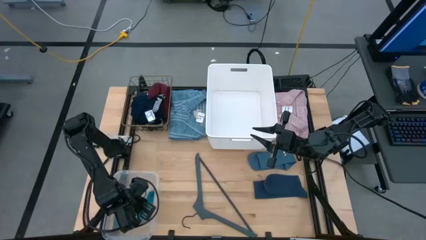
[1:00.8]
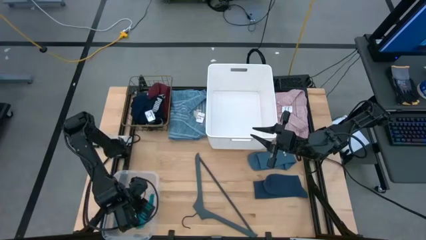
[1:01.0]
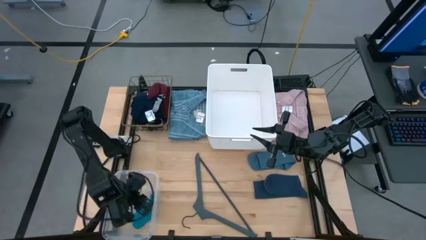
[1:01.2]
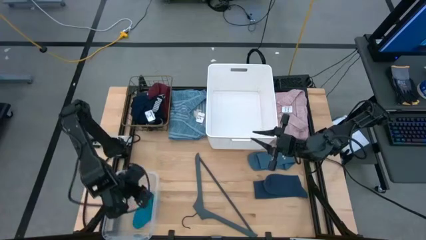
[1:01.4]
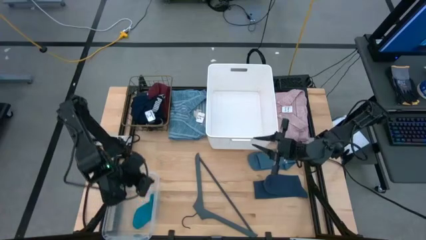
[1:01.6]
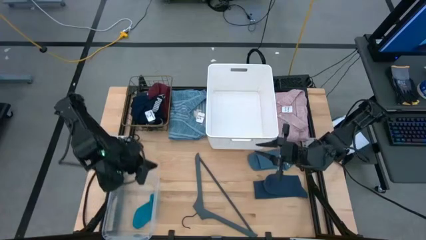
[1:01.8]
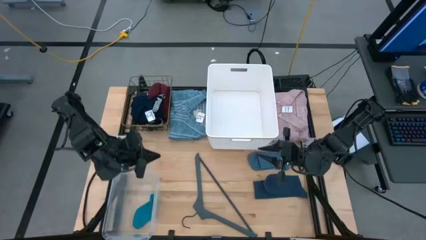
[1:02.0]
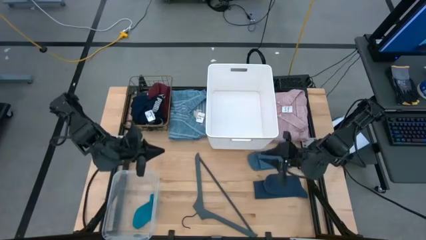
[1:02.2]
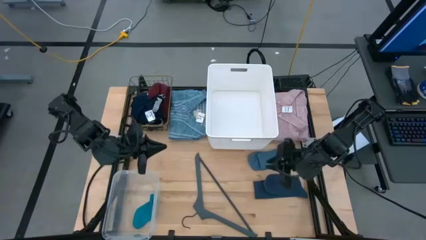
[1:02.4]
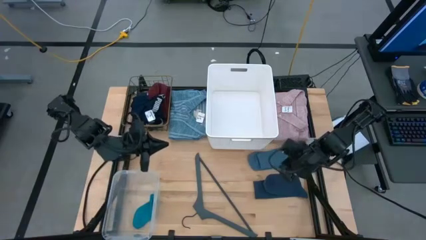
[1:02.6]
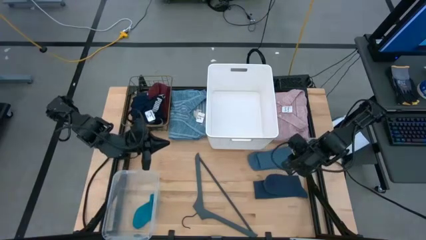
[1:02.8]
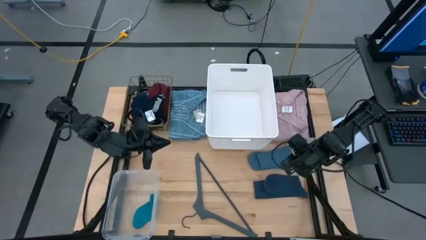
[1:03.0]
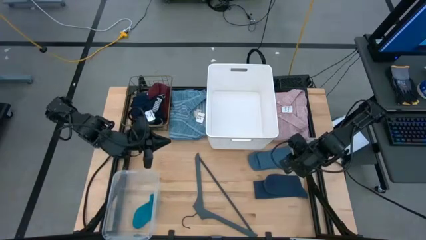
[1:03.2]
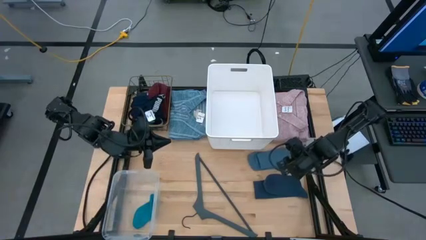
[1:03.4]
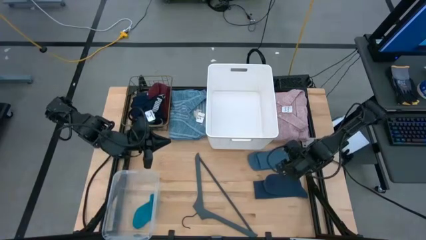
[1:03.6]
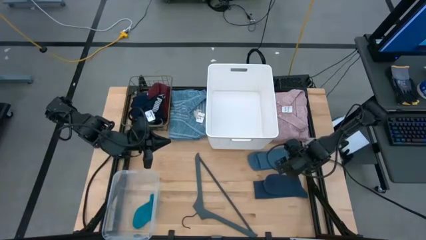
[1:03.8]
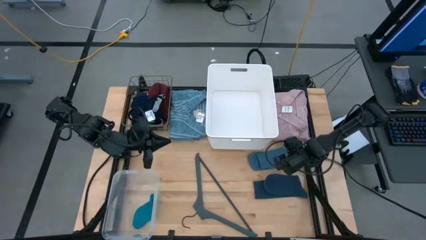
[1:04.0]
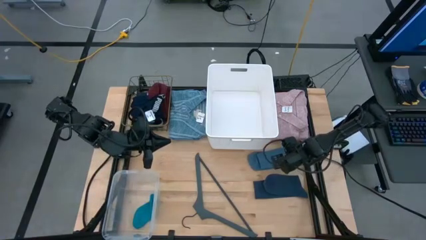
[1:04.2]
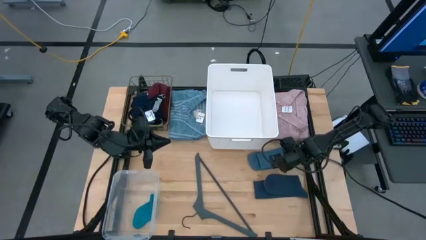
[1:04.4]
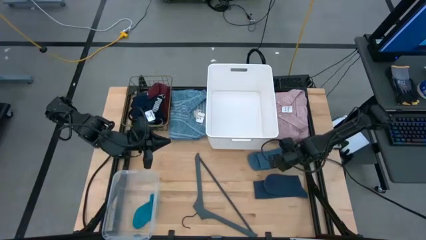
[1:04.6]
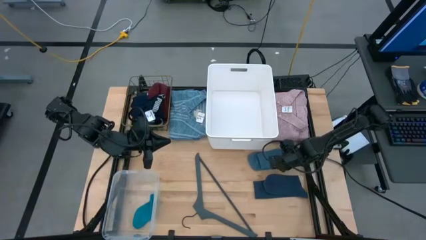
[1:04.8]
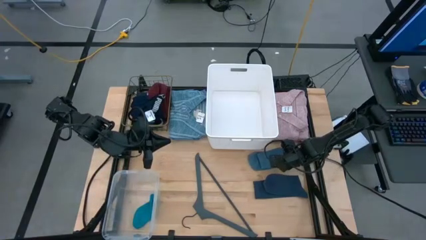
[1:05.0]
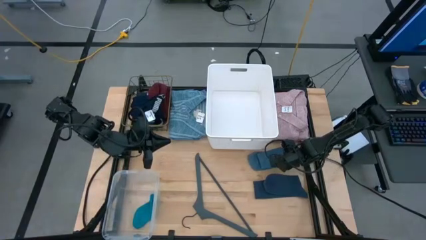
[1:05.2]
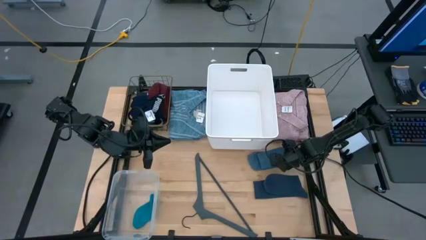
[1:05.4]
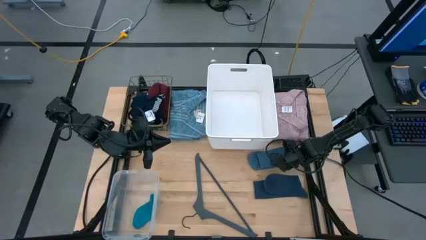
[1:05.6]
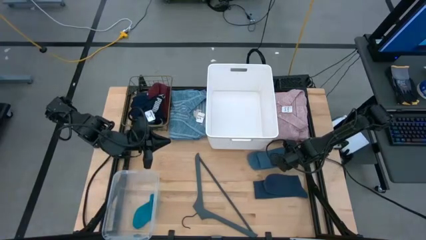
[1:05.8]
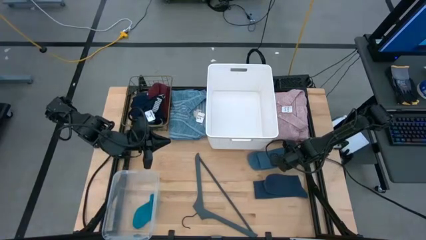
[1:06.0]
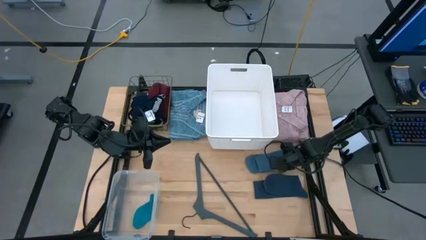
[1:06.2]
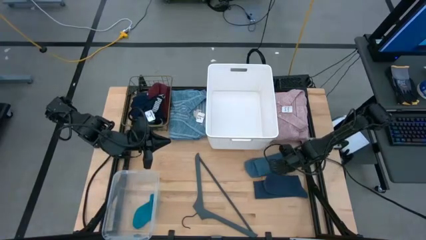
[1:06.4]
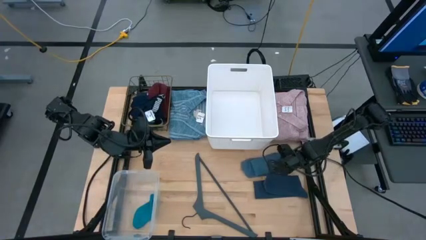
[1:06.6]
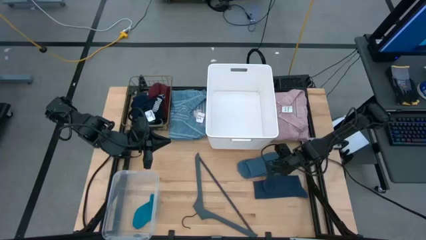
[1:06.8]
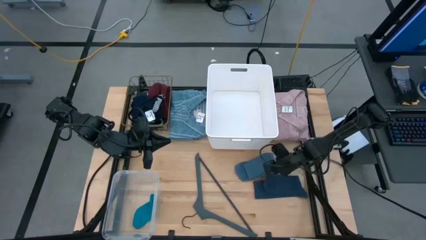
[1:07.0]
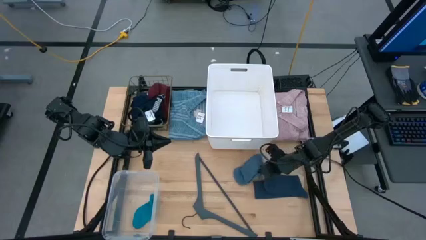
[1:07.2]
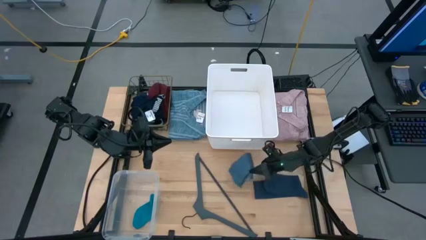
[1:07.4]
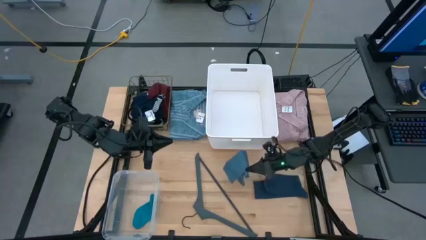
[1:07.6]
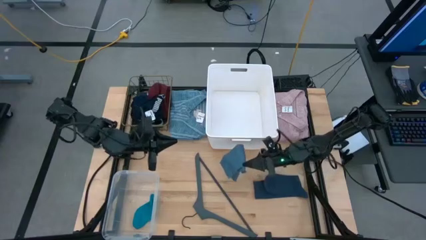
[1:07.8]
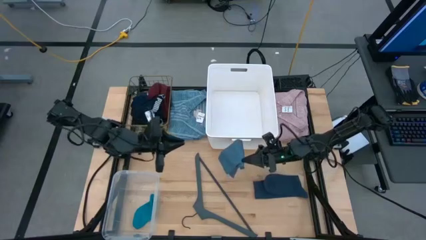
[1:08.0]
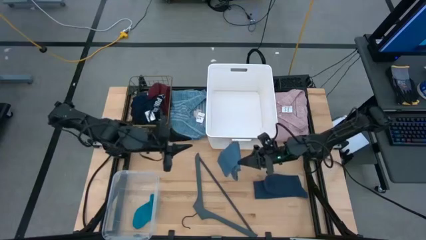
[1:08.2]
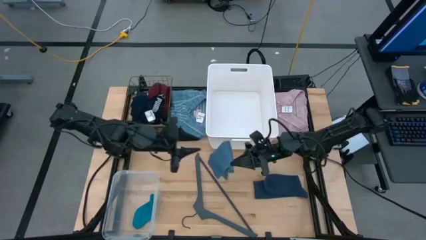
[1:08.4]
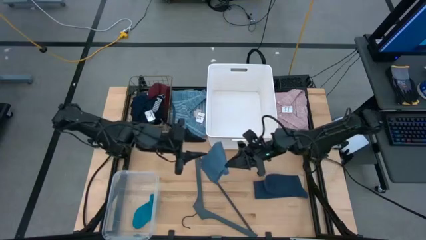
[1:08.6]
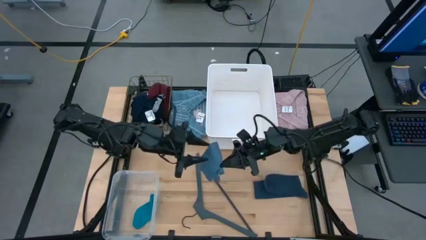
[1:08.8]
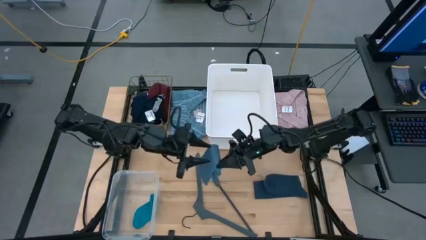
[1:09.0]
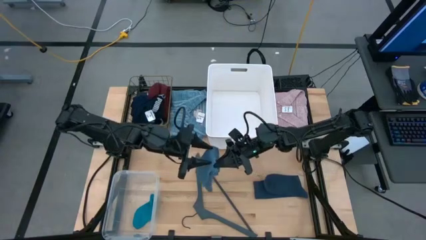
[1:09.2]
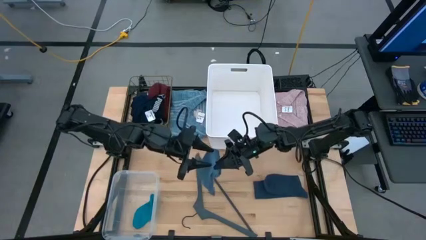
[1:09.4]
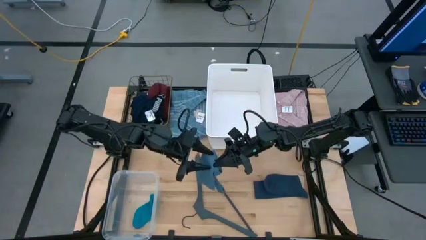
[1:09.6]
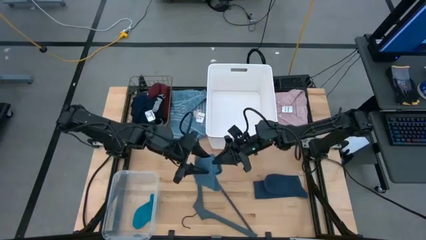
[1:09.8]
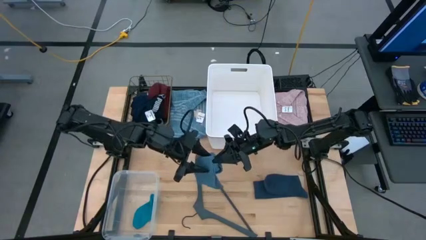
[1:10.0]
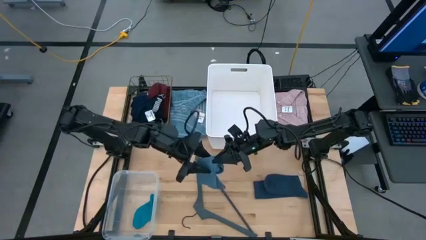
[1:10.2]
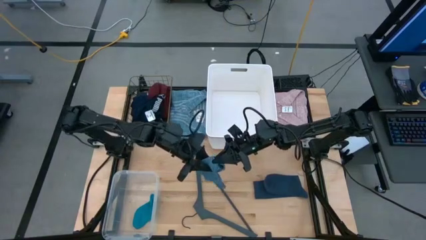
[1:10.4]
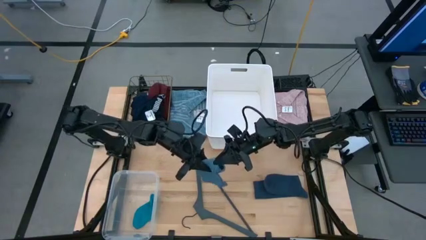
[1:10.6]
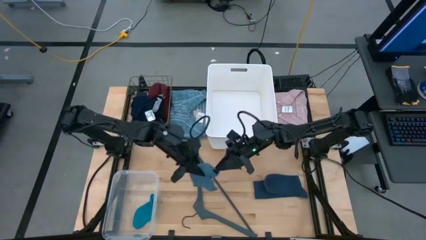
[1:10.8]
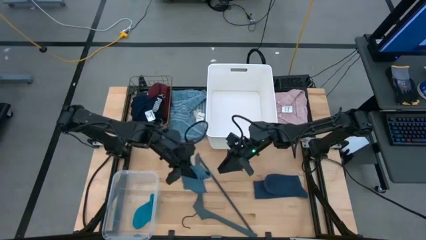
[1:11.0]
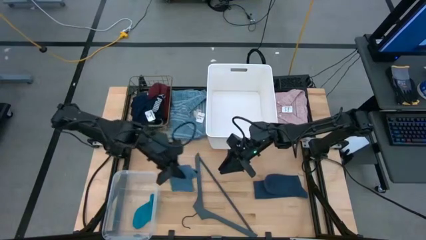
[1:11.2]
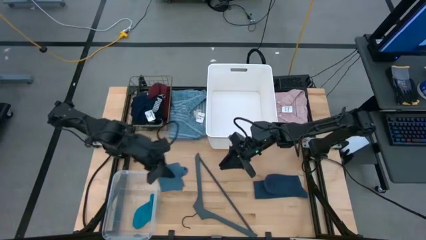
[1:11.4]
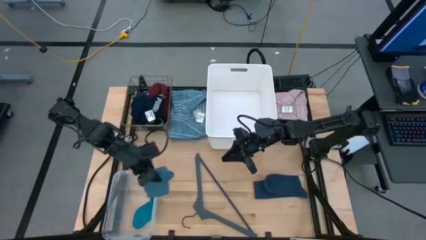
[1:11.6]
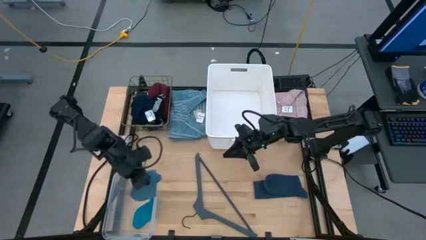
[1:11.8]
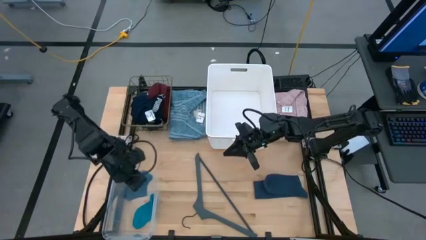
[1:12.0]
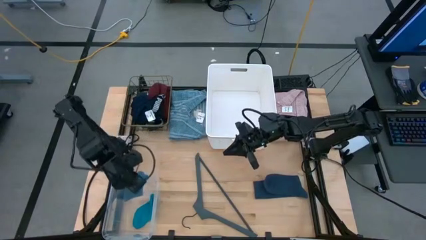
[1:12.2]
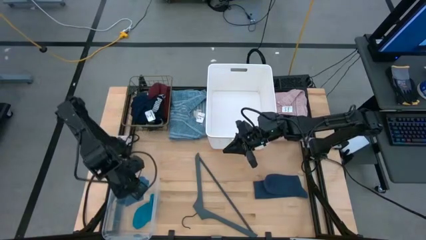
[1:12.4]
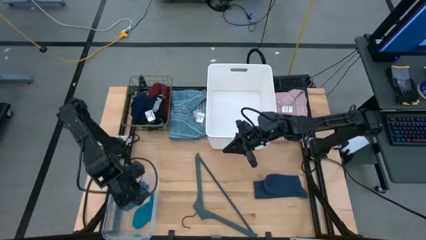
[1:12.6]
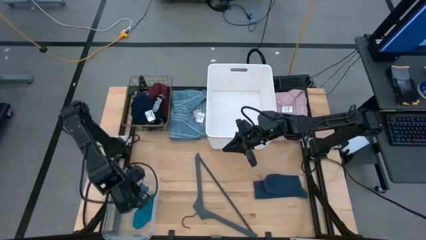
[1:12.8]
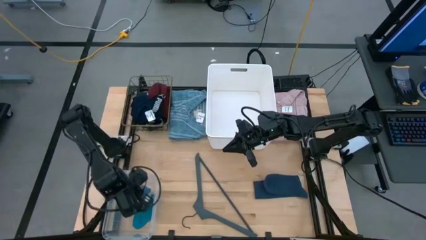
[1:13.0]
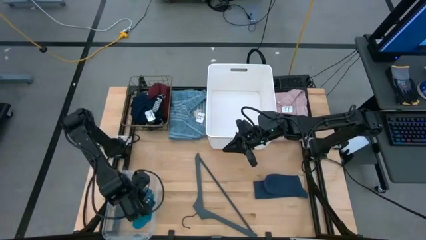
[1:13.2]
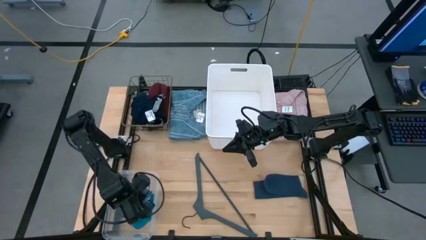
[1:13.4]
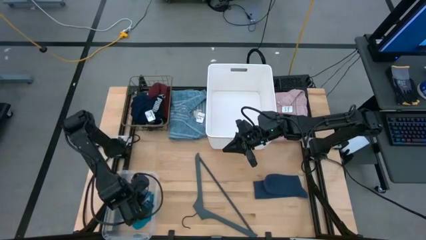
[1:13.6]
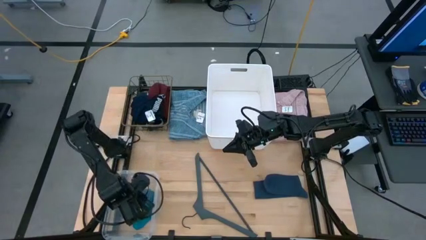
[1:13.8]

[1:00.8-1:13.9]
Task: Pick & Place Cloths
Put the gray sock into the transparent bin

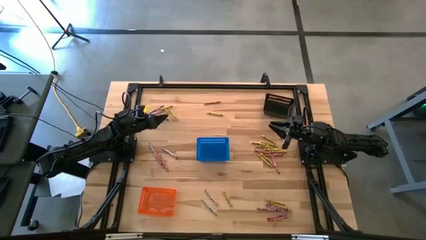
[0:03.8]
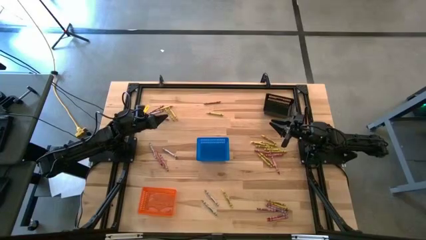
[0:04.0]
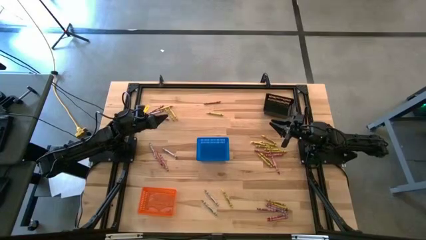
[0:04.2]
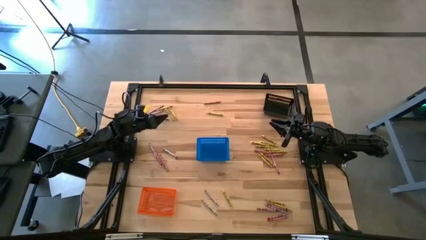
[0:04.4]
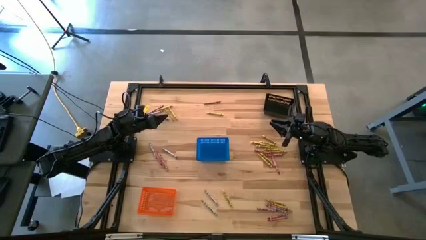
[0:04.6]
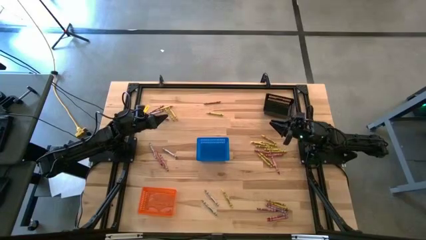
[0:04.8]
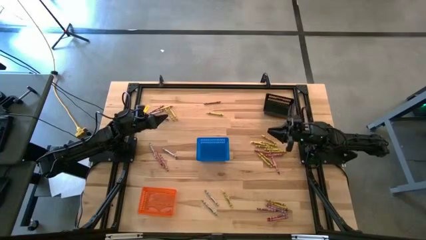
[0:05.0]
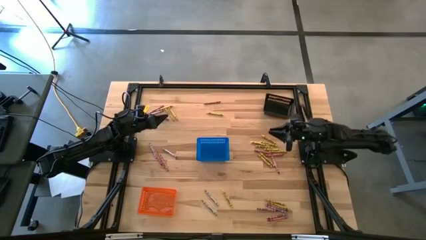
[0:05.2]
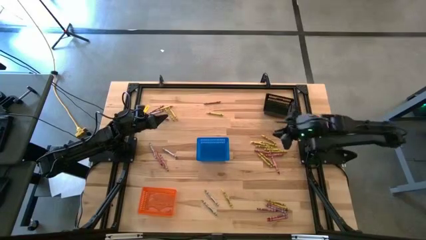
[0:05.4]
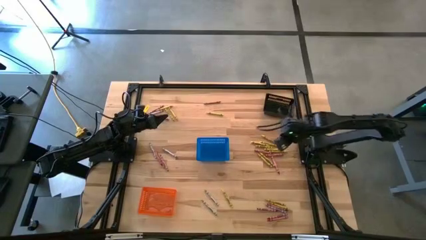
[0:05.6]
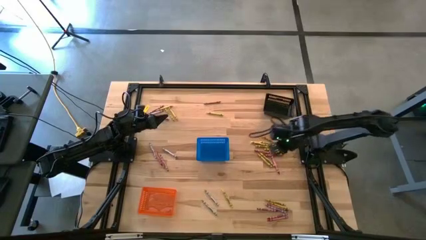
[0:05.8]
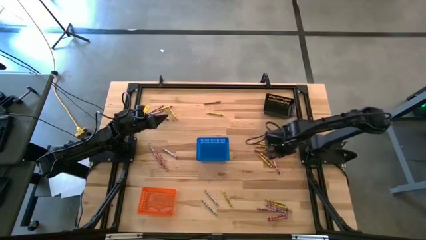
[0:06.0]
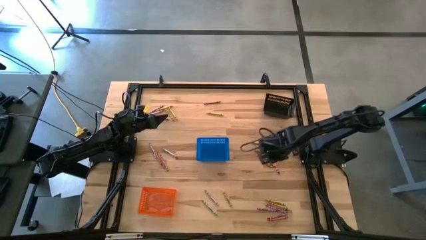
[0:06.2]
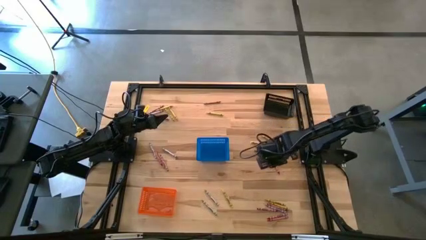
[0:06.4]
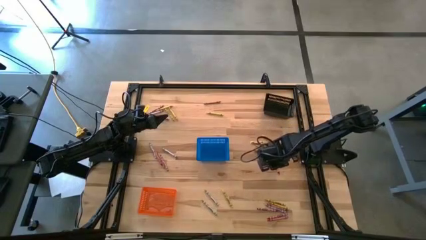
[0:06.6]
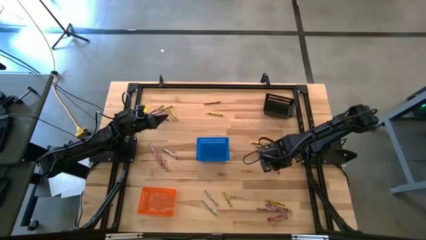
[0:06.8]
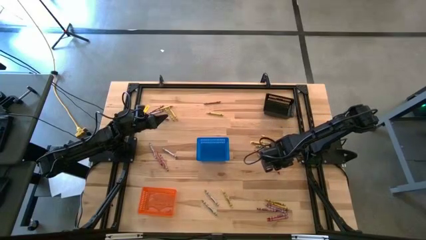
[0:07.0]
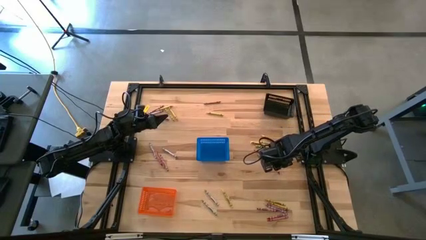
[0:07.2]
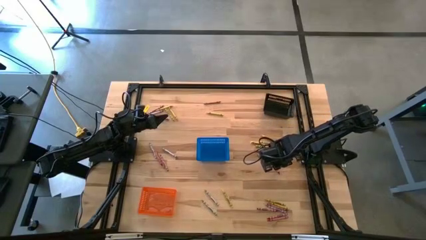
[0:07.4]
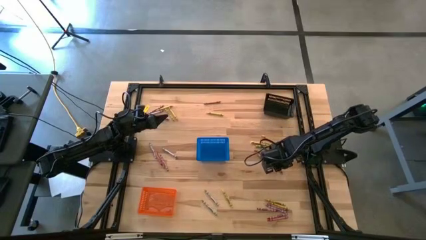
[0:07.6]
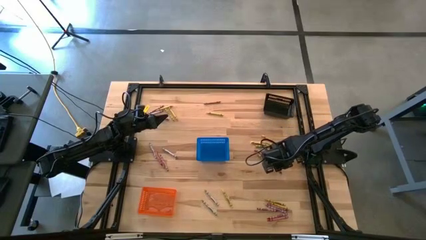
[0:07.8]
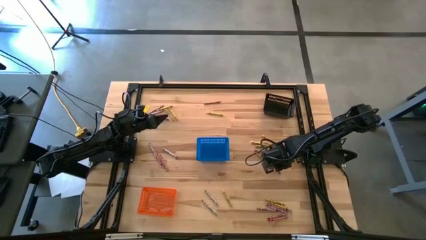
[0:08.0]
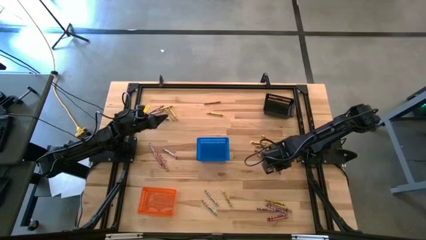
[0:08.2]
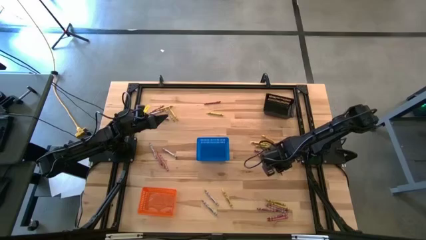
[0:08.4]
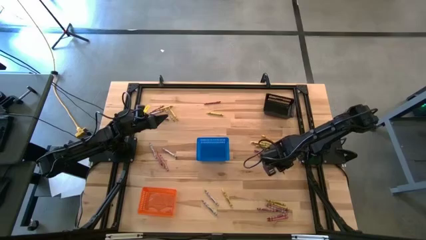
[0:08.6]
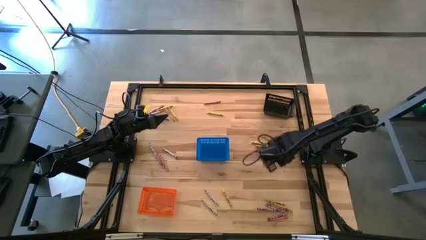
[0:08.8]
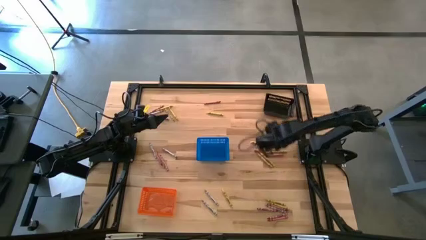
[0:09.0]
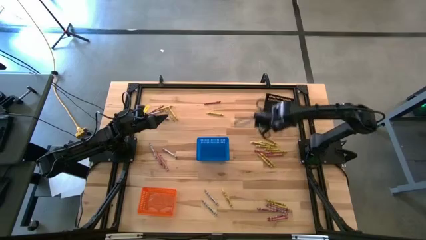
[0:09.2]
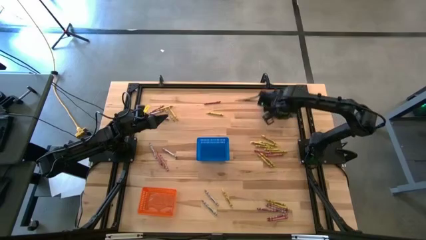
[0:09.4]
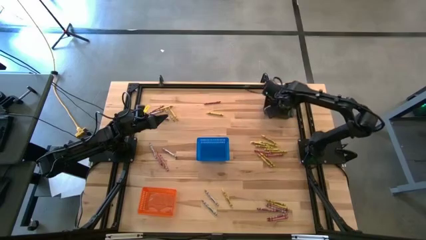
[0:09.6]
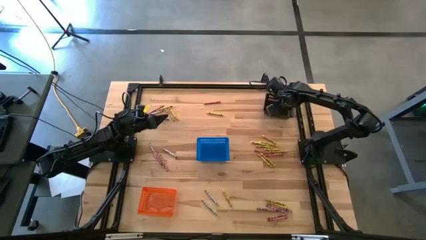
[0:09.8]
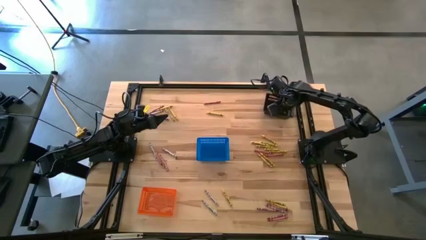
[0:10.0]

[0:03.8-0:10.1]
Task: Sort crayons
Put the red crayon into the black basket
